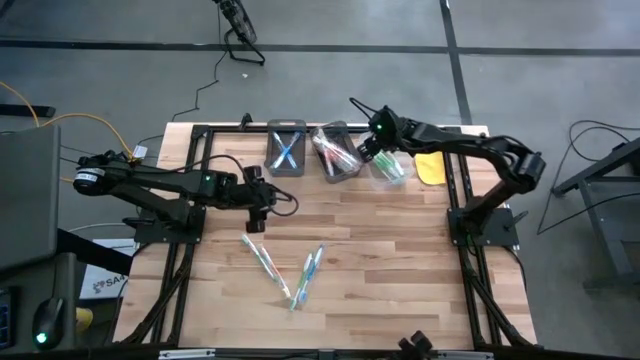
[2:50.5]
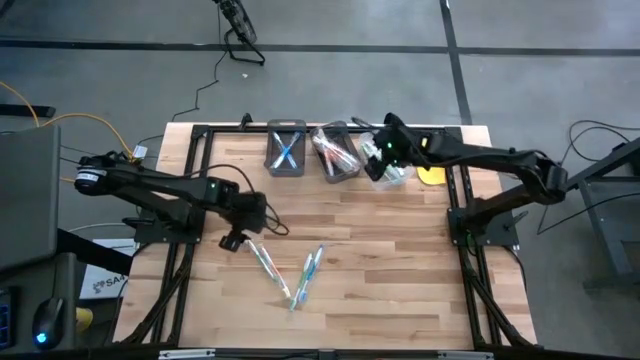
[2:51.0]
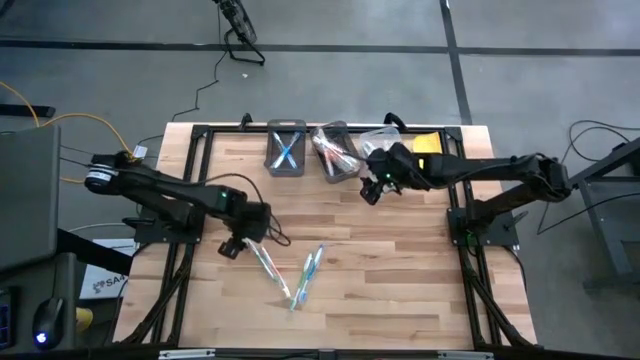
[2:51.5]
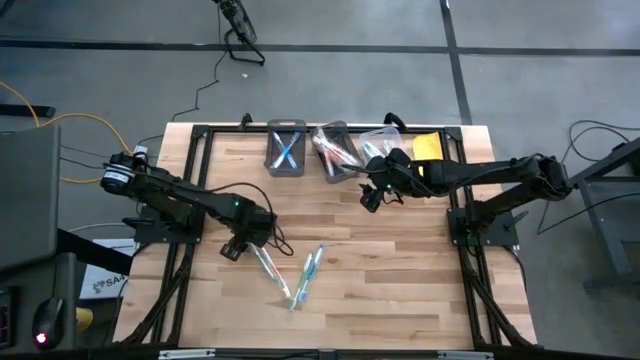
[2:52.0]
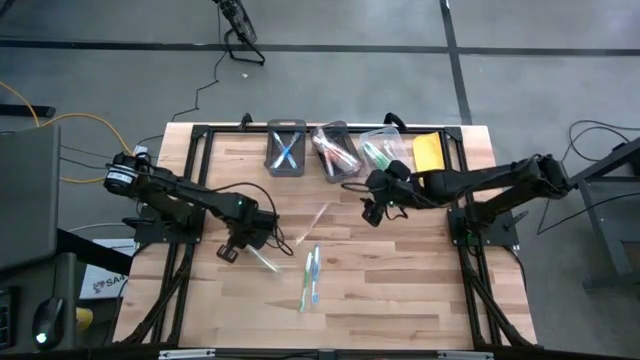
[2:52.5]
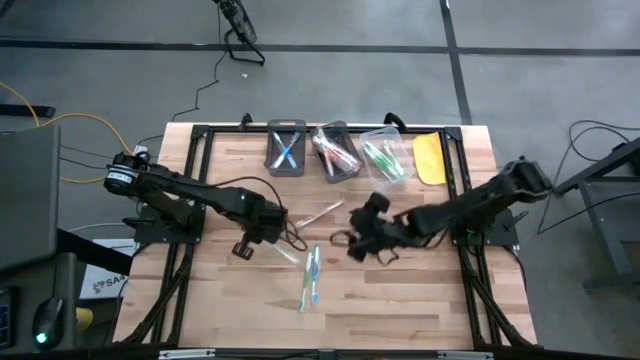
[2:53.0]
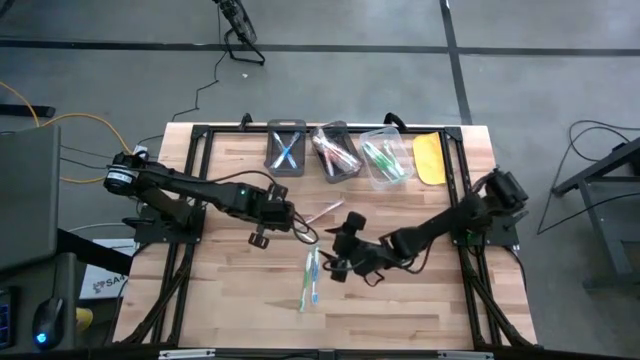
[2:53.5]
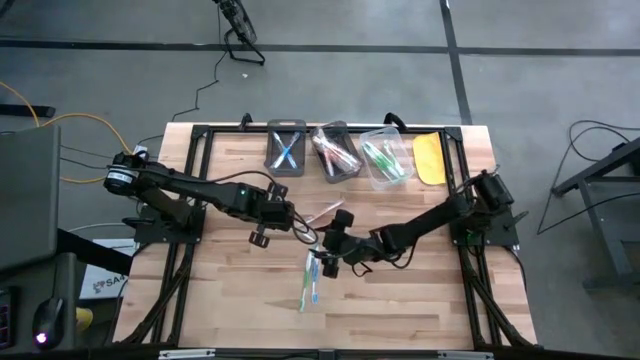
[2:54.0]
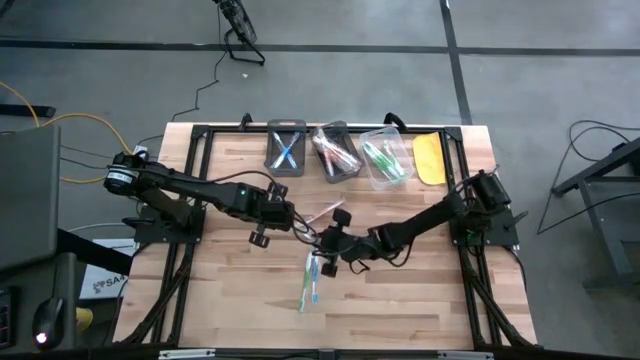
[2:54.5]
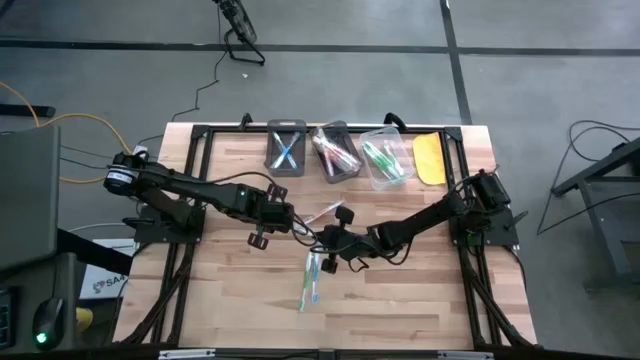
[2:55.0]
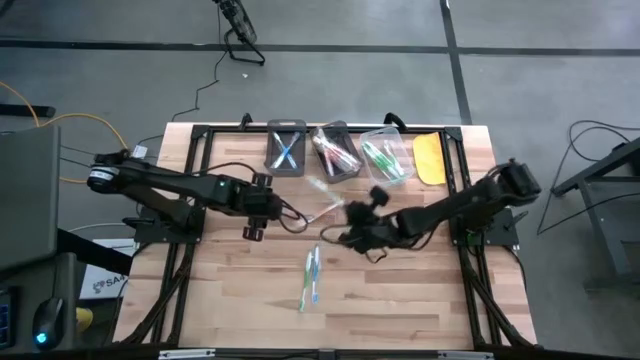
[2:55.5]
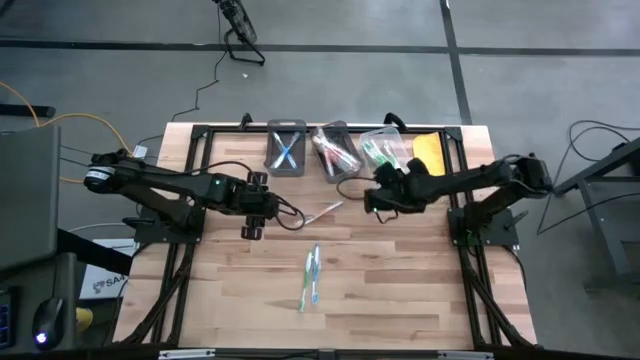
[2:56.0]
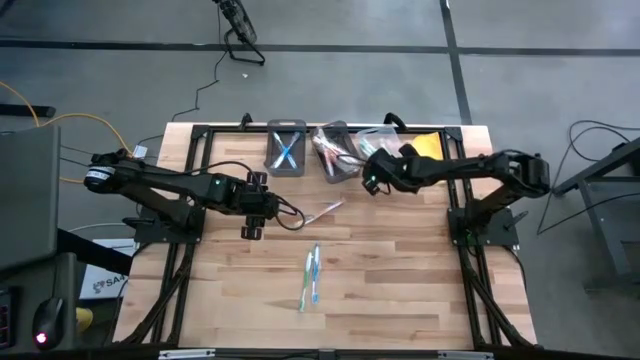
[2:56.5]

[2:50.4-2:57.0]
Task: Pick & Place Toothbrushes
Put the green toothbrush into the transparent bin

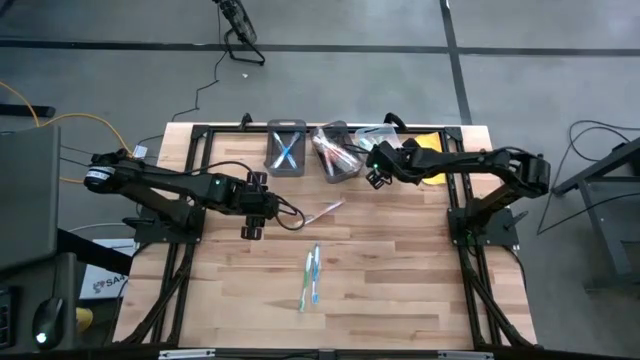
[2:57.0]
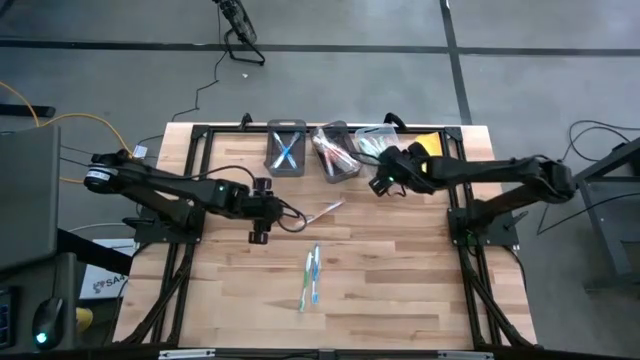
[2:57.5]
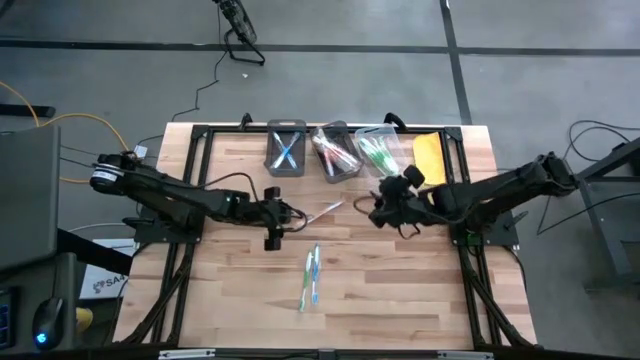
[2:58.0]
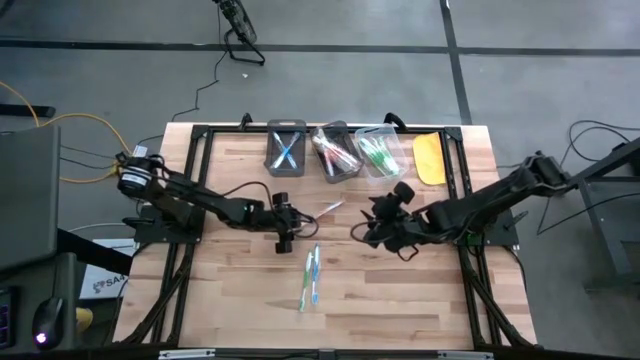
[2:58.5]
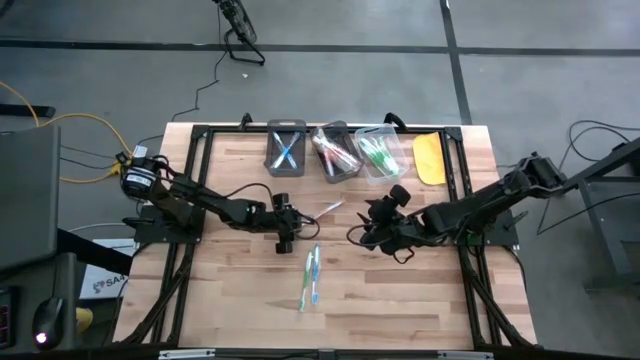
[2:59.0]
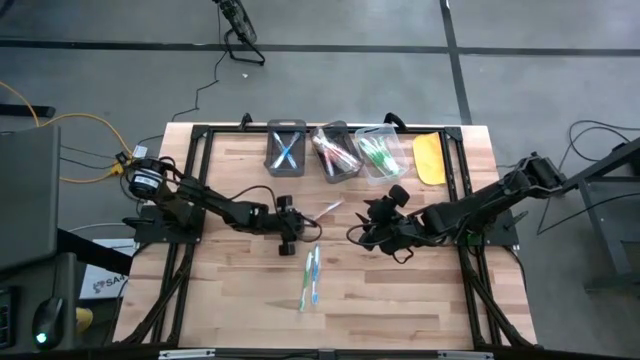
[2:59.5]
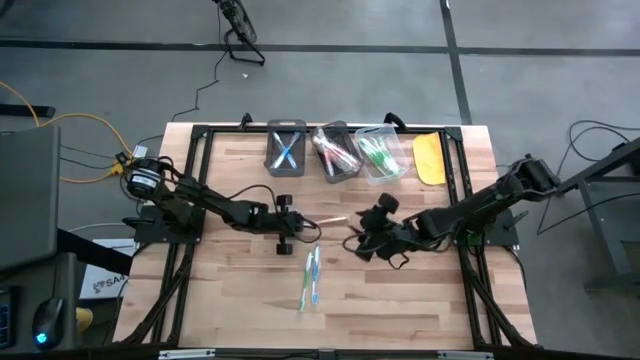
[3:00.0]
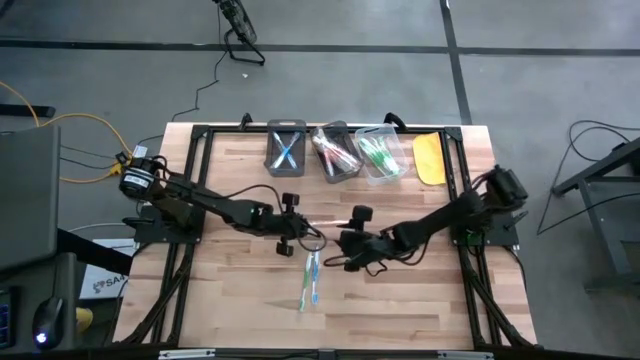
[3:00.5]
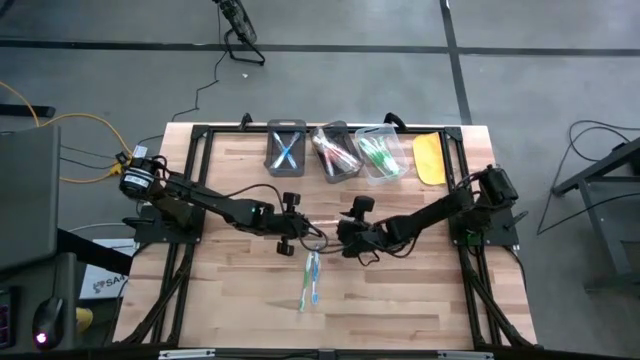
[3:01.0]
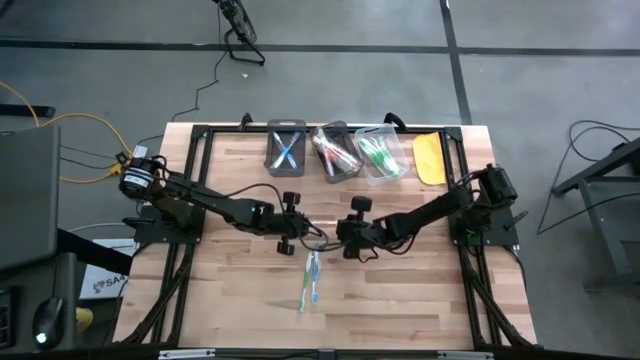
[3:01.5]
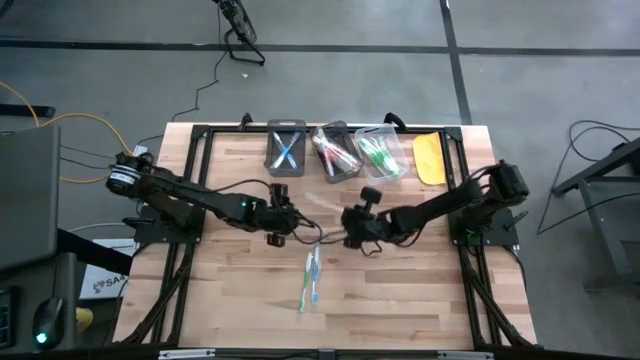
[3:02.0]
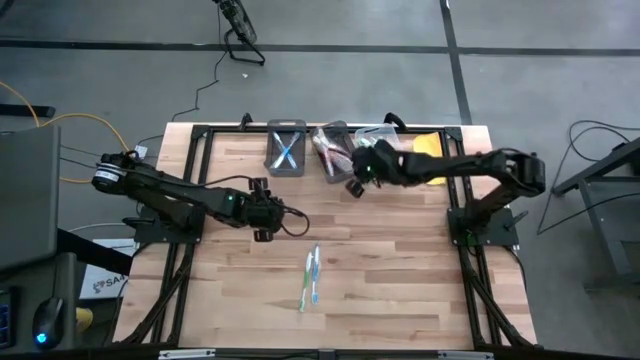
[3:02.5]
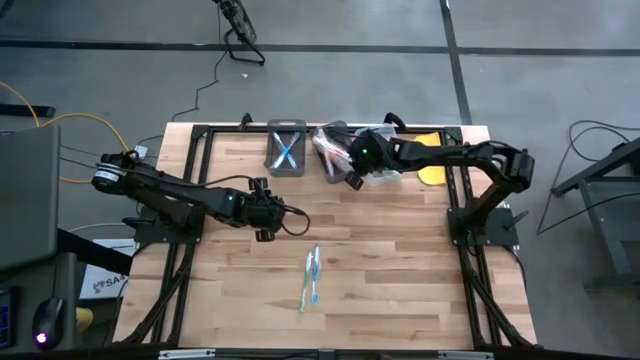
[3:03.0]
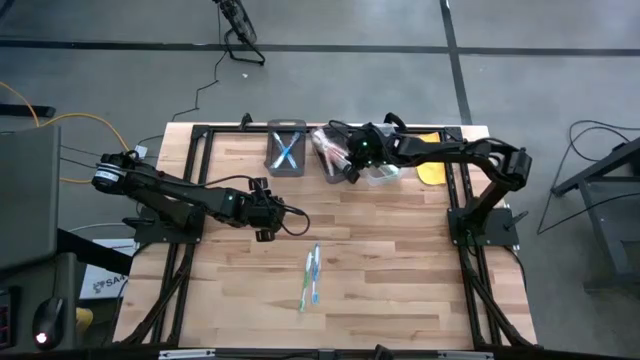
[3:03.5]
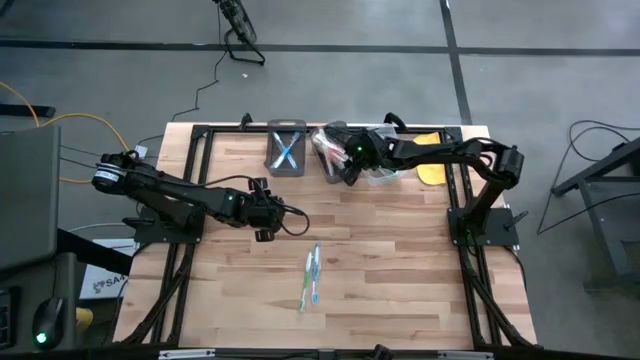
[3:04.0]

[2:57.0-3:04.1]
Put the orange toothbrush into the right black bin

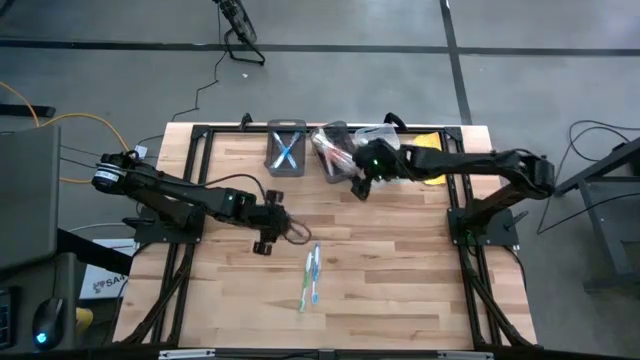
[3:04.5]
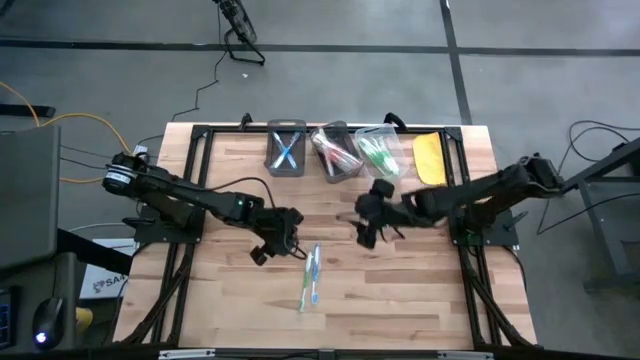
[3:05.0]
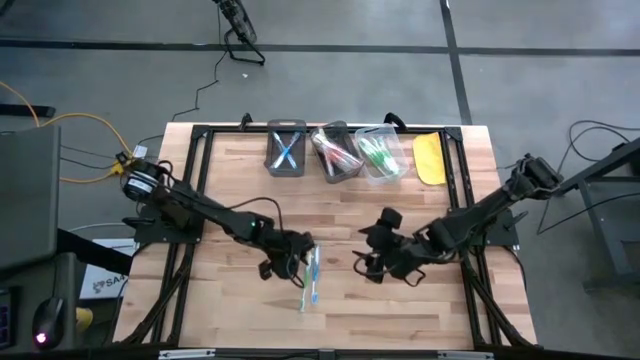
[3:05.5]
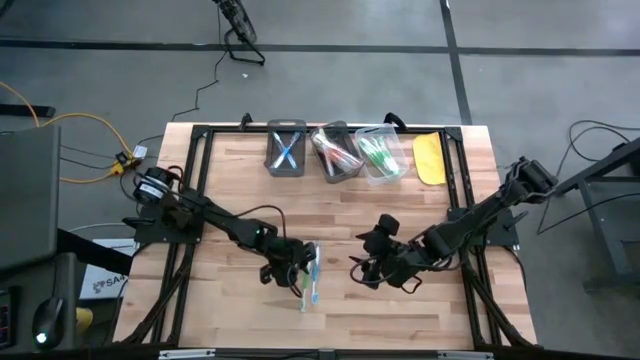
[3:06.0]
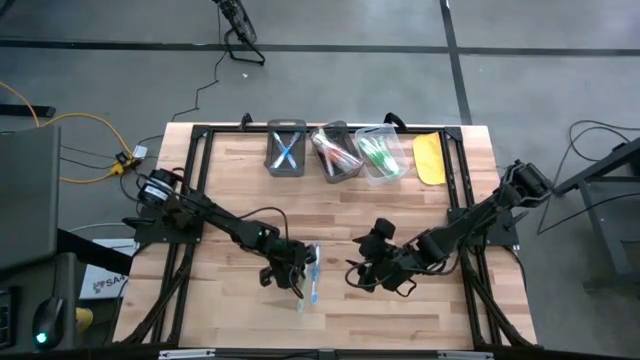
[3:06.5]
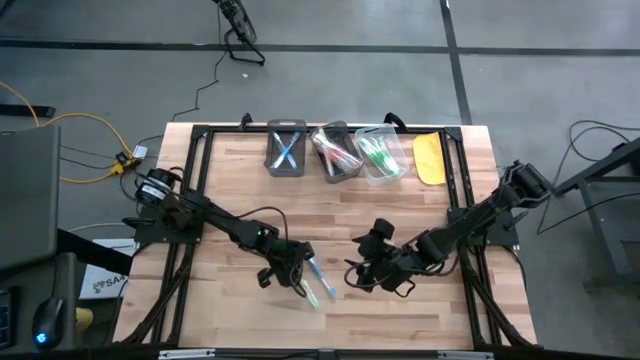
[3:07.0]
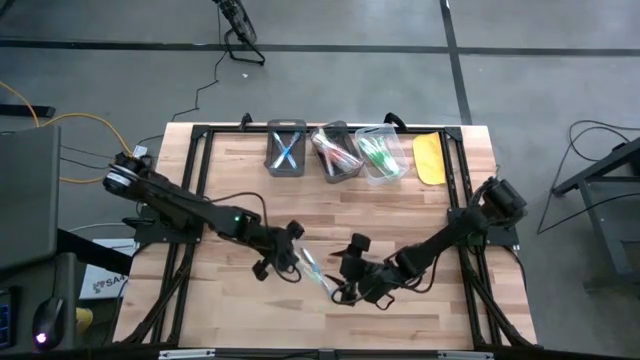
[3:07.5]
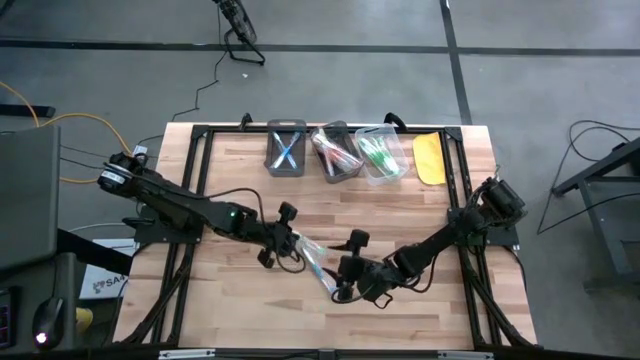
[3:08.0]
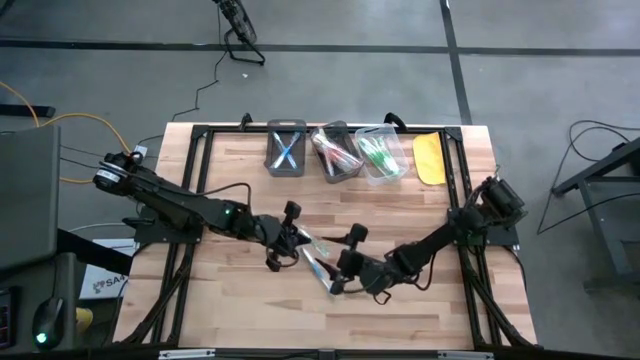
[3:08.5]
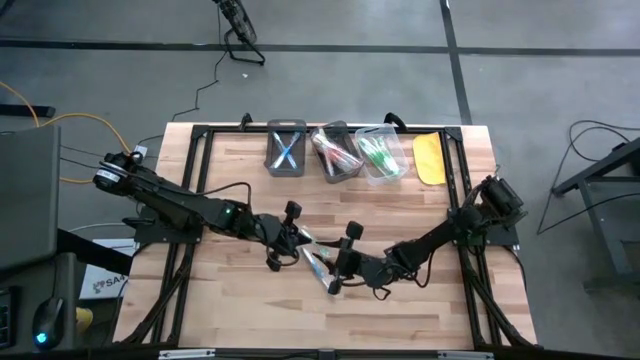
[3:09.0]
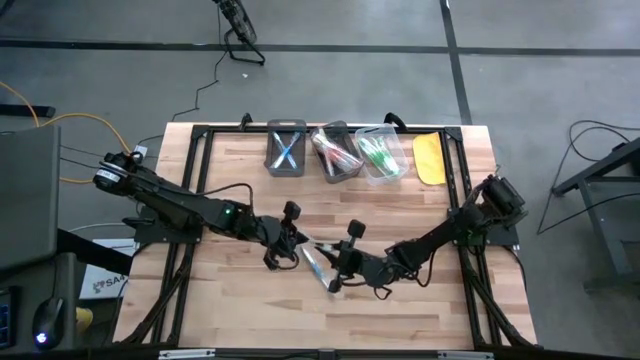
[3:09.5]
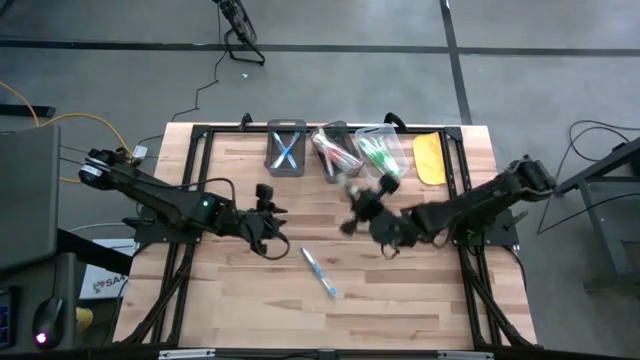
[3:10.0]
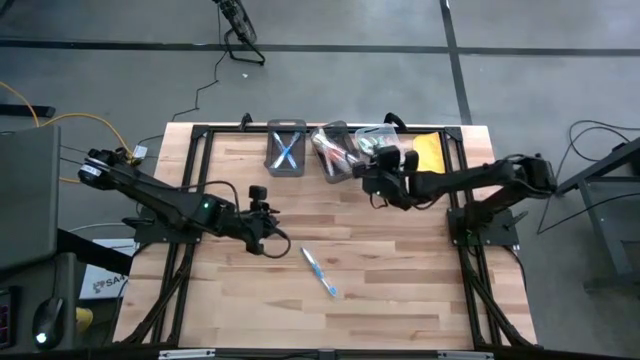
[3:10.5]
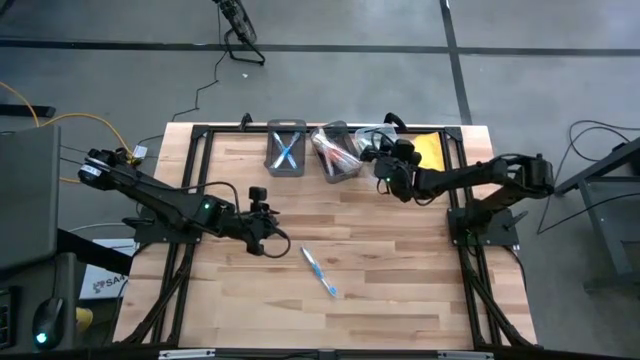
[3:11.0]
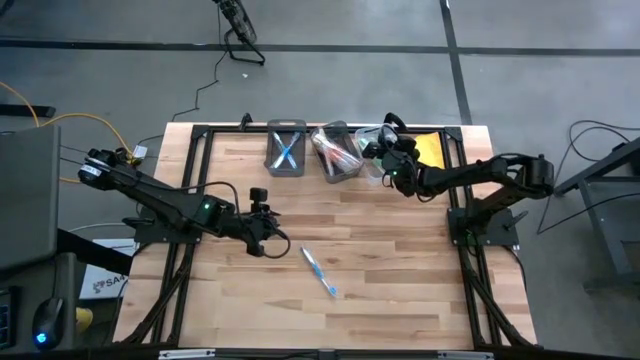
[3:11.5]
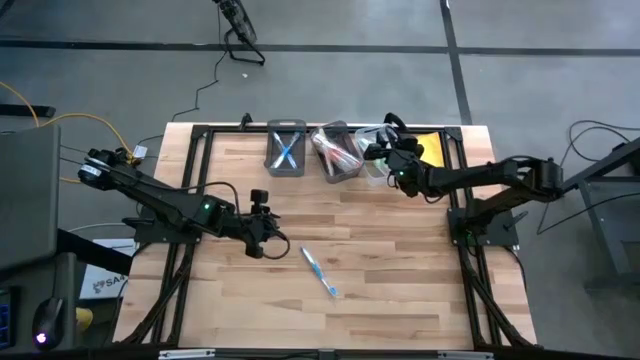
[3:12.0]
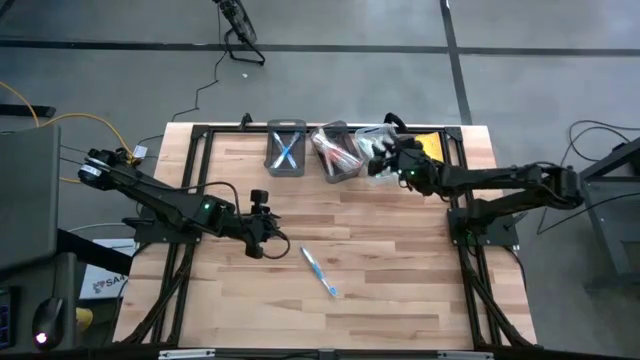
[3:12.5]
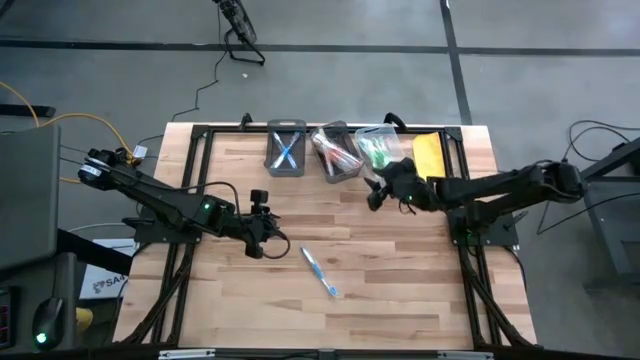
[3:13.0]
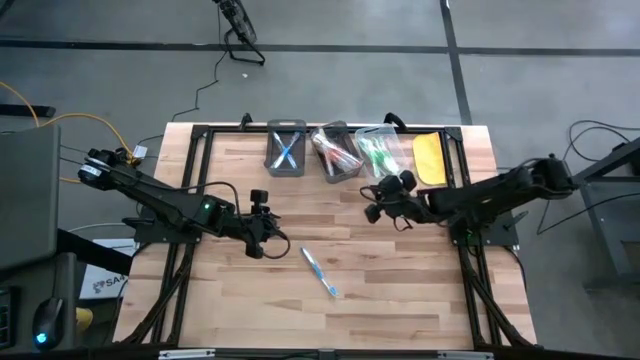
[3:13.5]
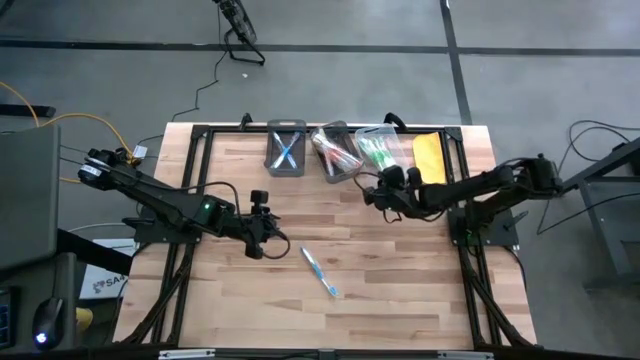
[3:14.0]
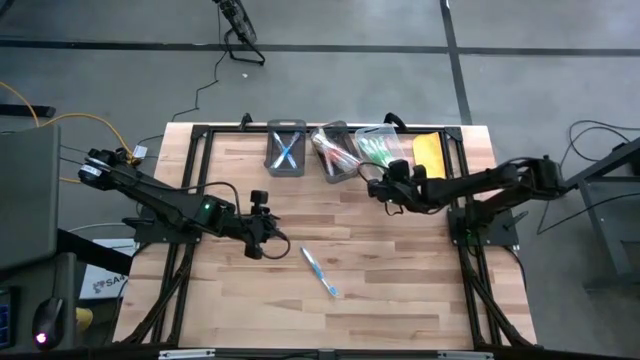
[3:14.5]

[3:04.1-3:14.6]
Put the green toothbrush into the transparent bin
